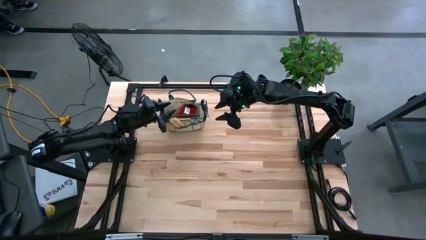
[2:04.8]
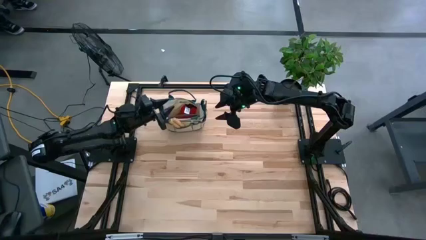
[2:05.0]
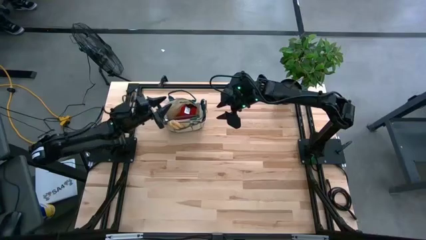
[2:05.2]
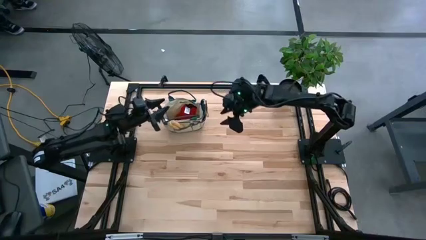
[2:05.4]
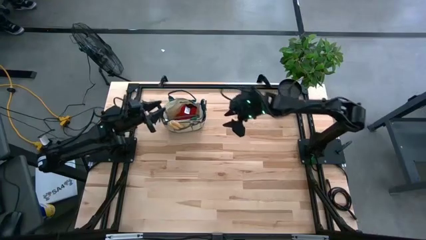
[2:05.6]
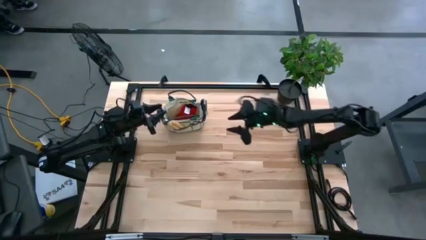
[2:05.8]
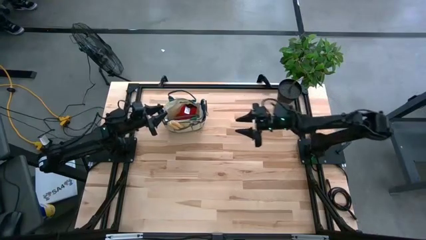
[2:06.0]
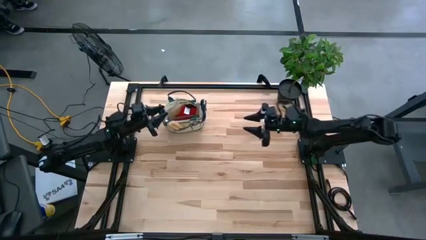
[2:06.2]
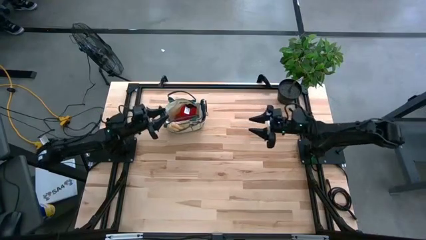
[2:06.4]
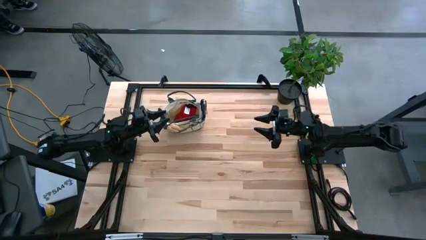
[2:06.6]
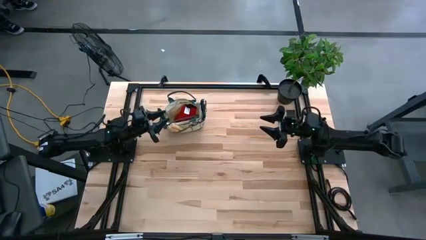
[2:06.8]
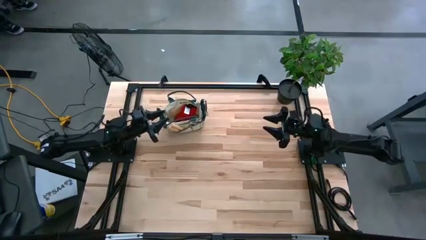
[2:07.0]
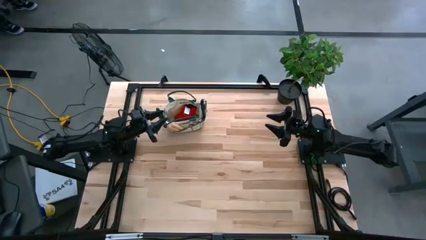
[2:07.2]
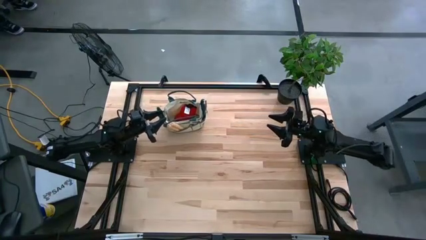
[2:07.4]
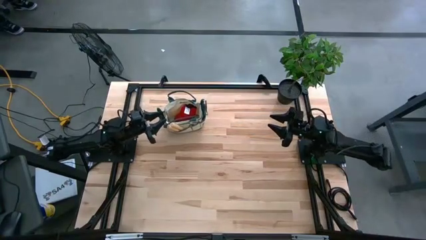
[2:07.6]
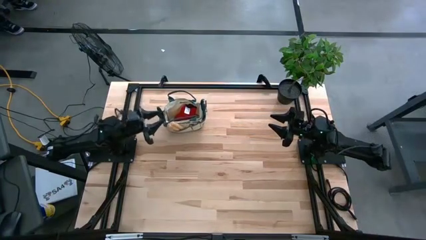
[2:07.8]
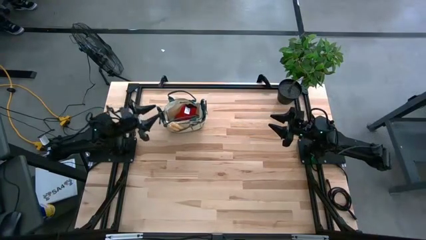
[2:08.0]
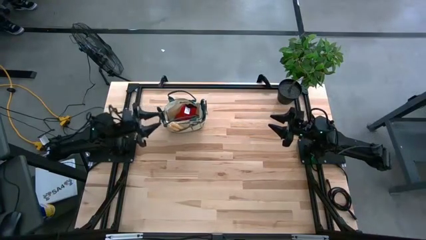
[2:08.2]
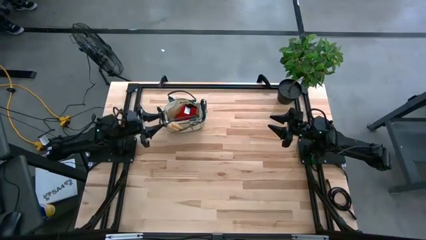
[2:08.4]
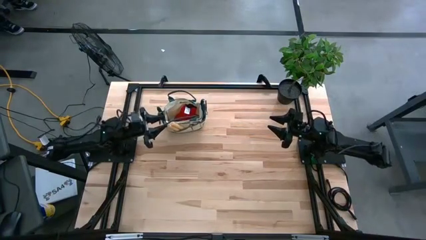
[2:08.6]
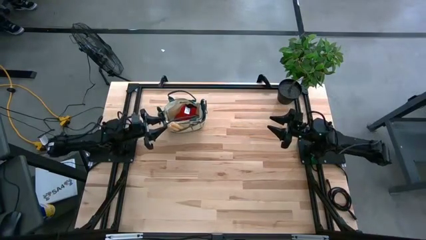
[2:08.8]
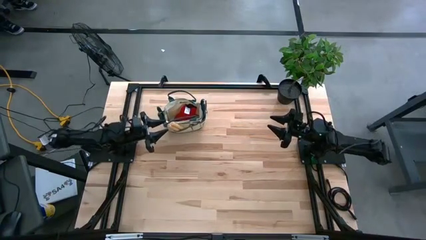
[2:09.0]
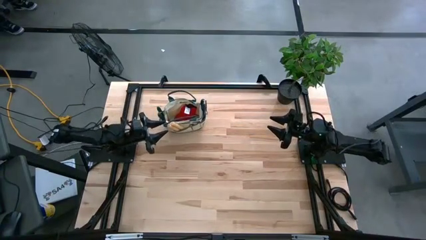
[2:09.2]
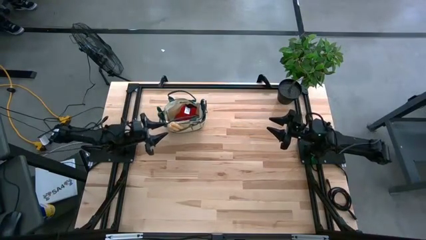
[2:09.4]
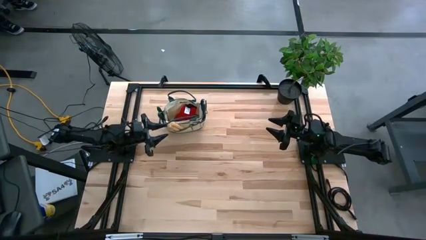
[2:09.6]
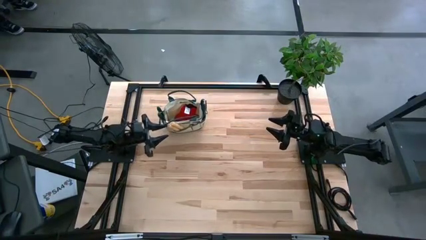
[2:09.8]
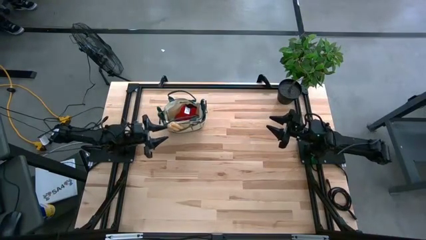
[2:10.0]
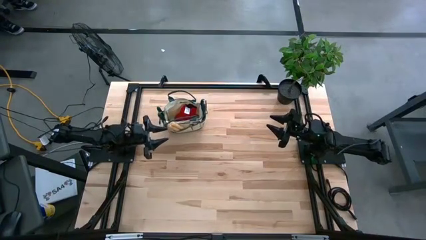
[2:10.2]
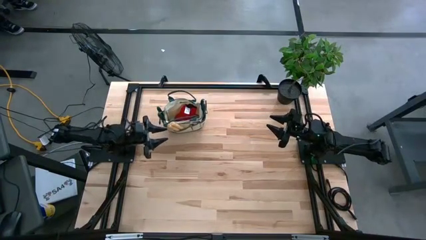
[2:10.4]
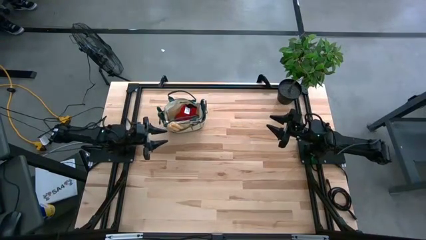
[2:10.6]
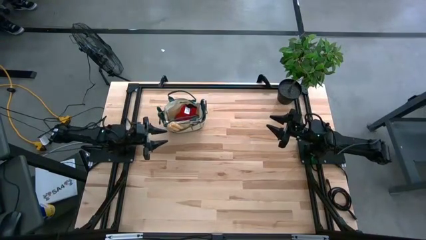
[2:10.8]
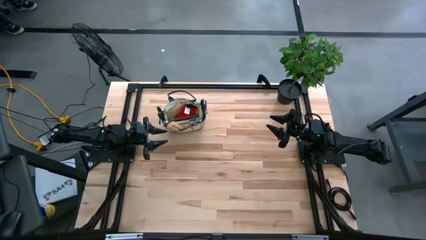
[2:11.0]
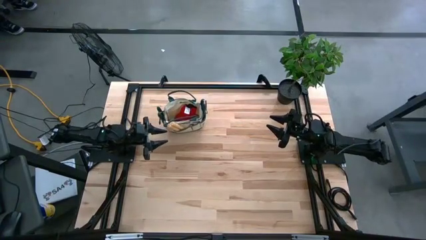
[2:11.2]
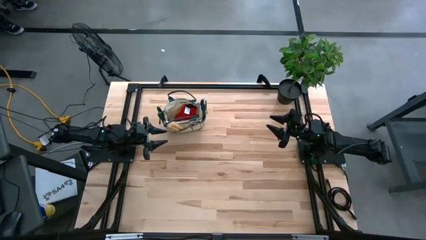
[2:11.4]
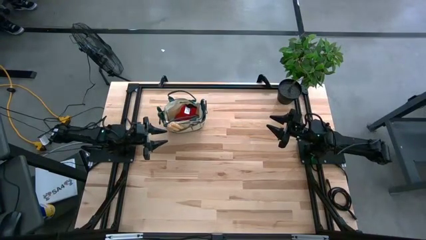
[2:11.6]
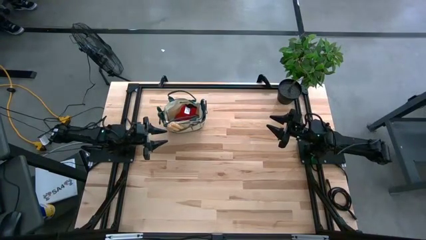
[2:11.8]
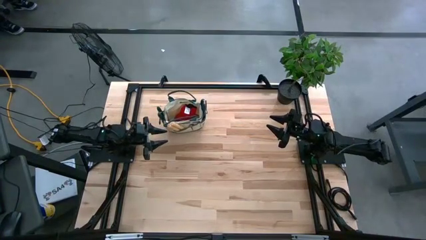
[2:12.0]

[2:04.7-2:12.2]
Task: Pick & Place Garden tools in Gardening bag
Return to Home Position

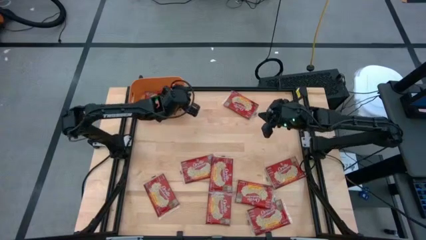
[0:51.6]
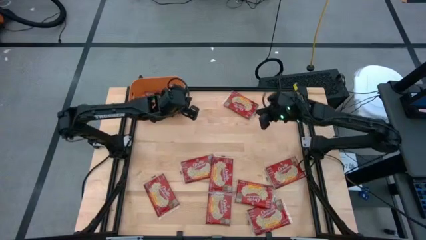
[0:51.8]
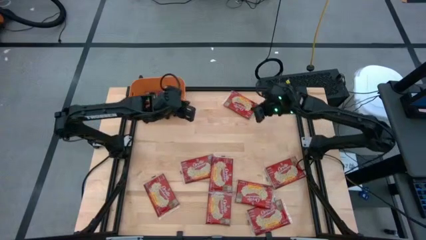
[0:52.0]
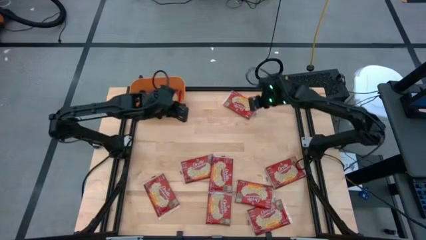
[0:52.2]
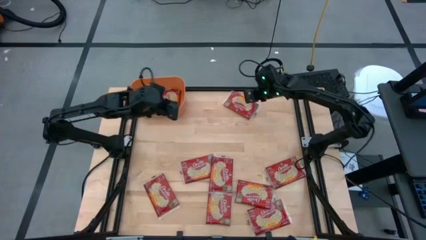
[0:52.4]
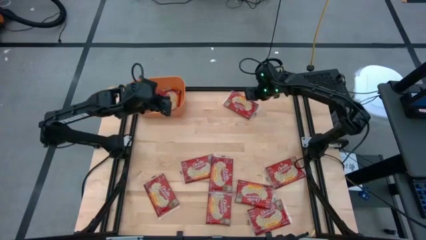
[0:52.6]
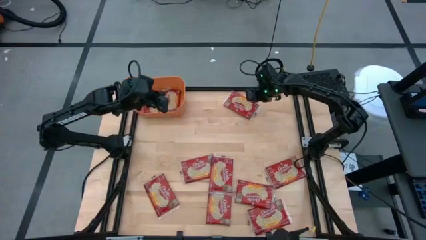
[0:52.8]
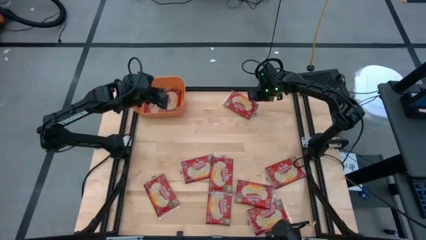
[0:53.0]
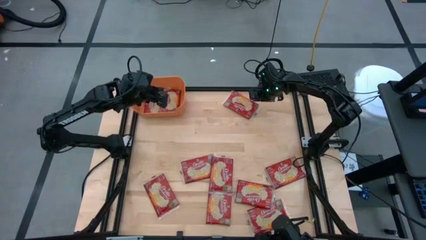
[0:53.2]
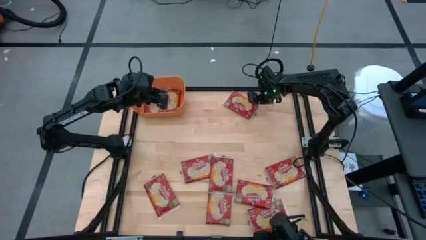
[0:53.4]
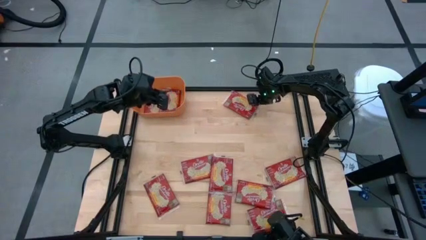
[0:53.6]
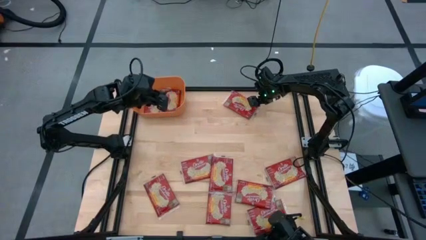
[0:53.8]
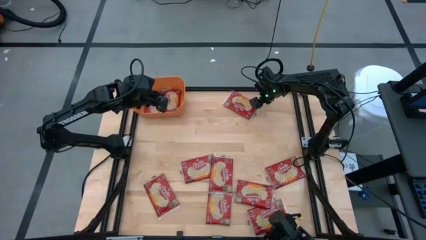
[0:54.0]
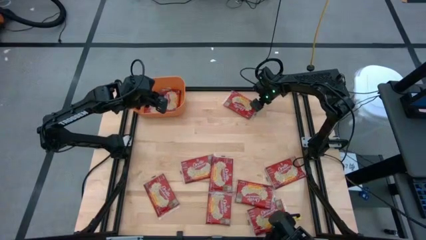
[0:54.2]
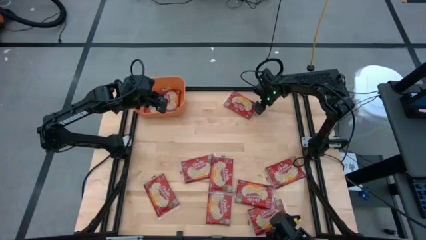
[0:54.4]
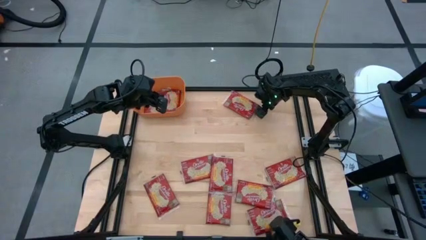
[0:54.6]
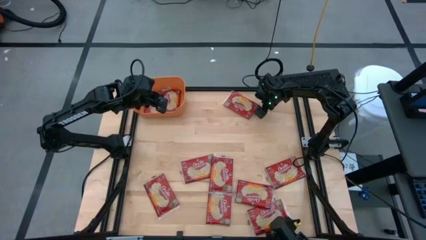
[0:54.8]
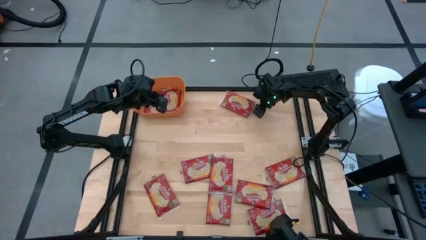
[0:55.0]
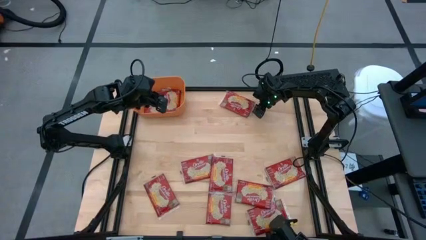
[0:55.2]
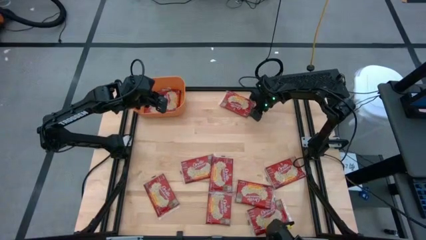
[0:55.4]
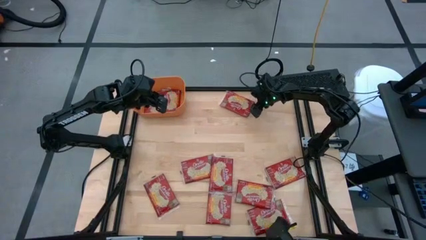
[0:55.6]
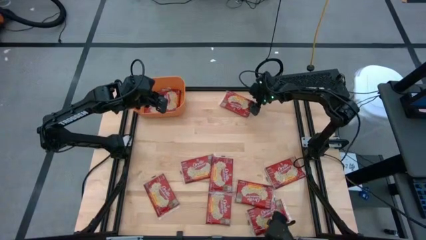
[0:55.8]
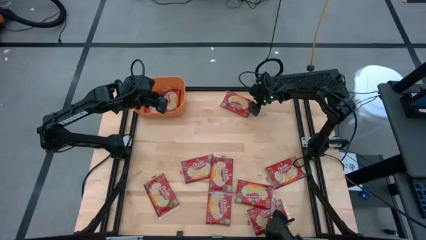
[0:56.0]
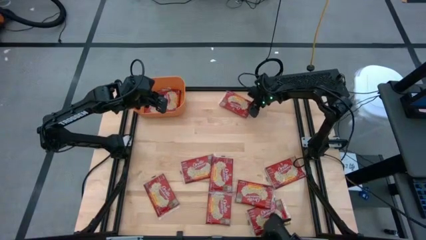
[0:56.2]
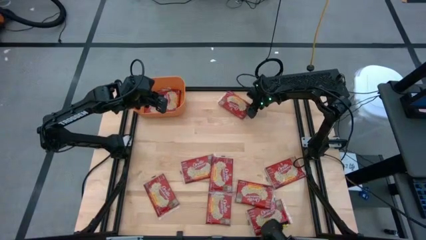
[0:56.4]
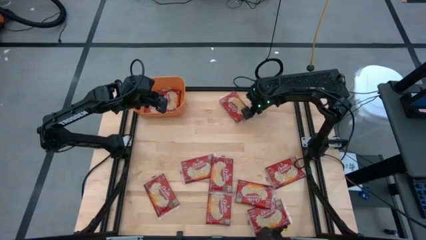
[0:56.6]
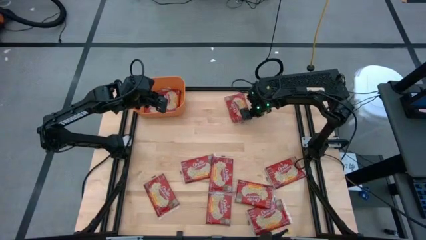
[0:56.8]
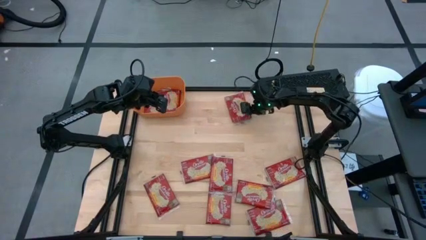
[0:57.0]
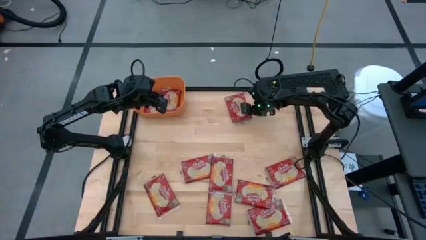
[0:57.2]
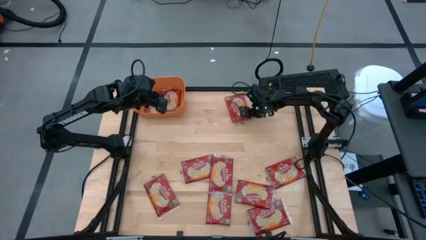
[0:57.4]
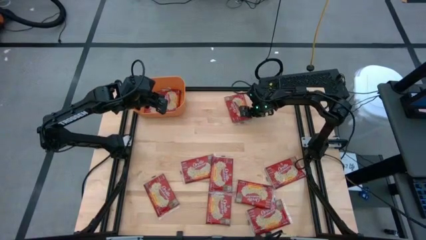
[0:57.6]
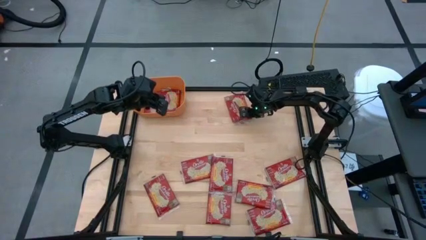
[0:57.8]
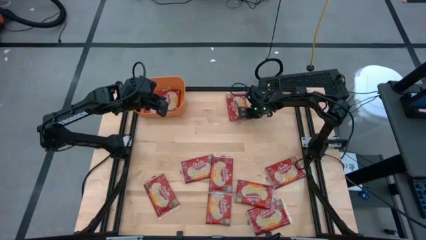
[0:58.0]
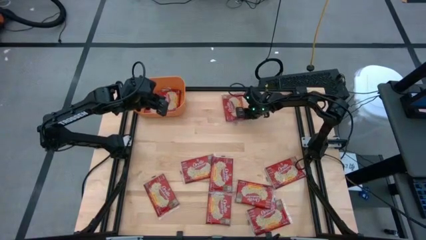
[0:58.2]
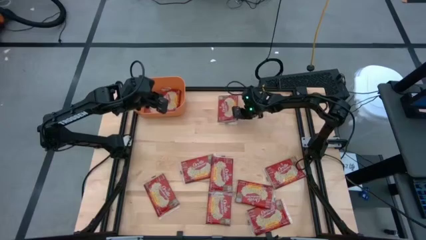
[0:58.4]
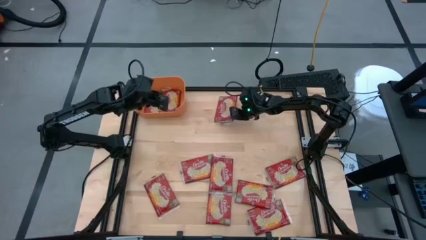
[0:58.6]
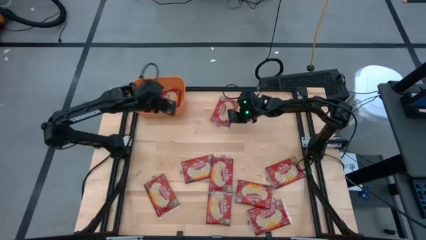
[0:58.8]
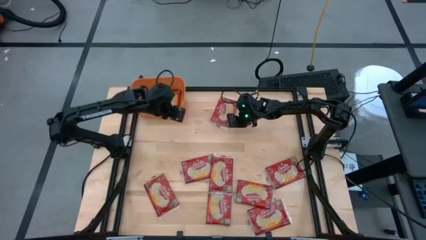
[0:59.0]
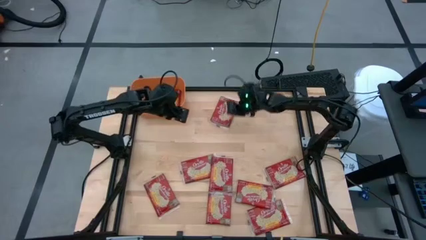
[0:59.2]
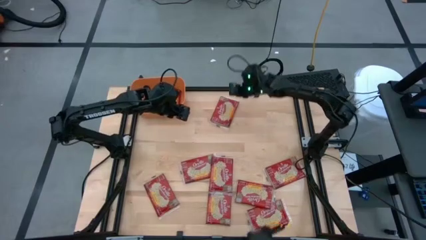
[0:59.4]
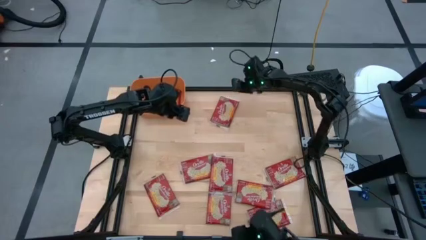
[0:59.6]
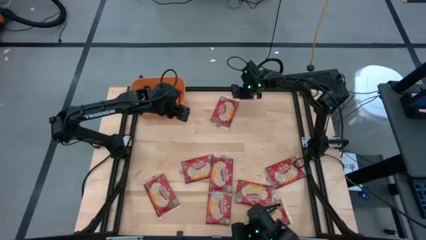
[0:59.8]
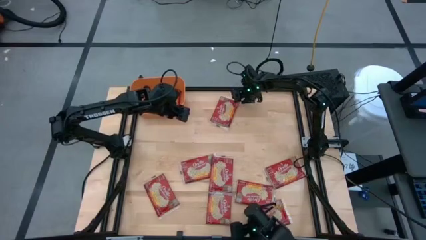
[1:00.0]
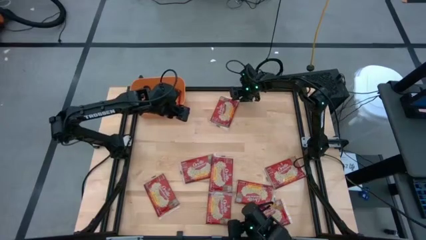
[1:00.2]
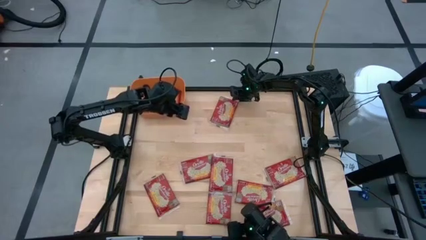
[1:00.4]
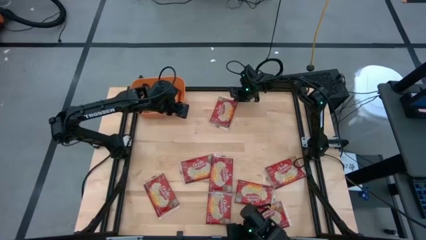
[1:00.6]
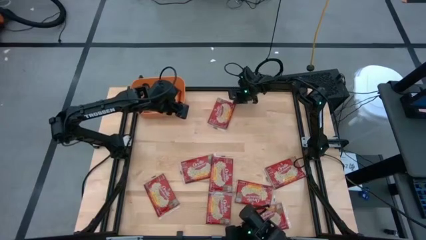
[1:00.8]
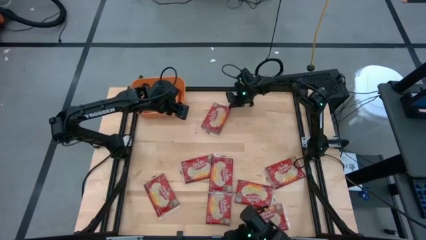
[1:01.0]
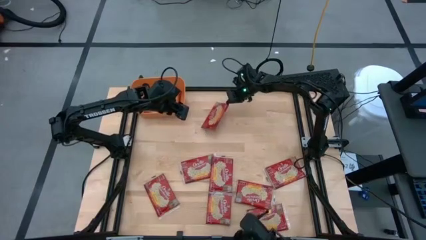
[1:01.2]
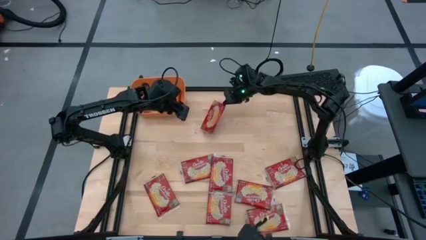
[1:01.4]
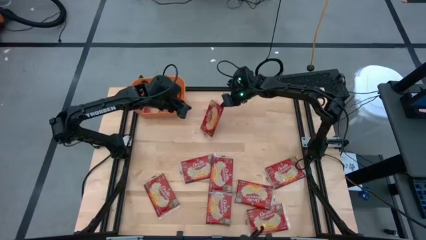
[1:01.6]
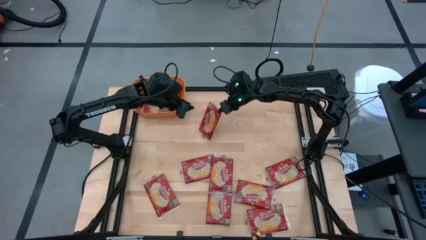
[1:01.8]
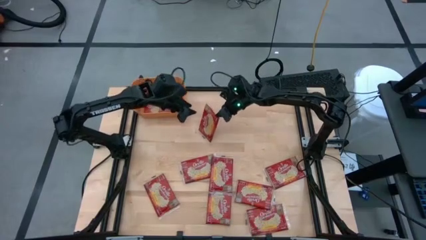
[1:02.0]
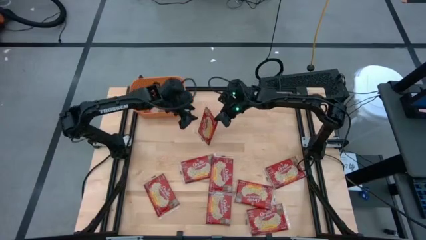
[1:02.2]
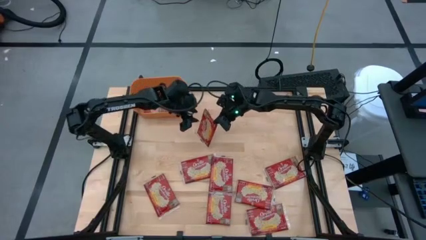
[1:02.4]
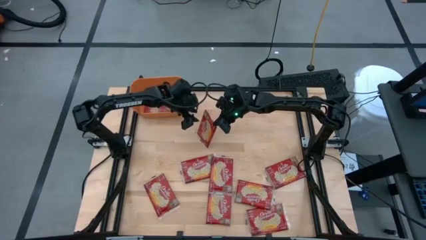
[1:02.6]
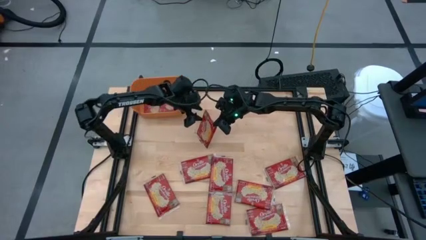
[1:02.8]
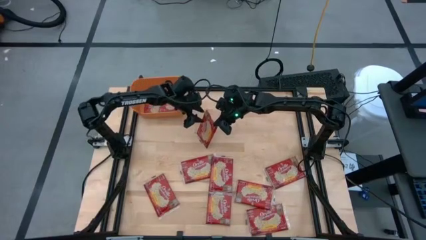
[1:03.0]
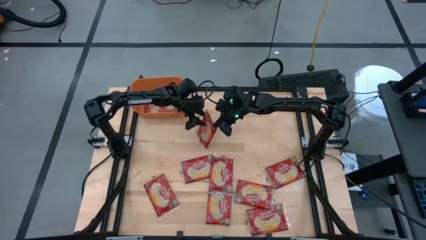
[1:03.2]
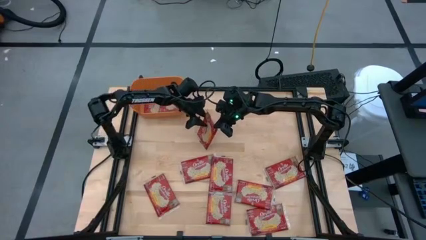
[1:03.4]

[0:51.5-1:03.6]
Task: Sort popcorn bags into baskets
Stack the red popcorn bag on top of the red popcorn bag in the orange bin
